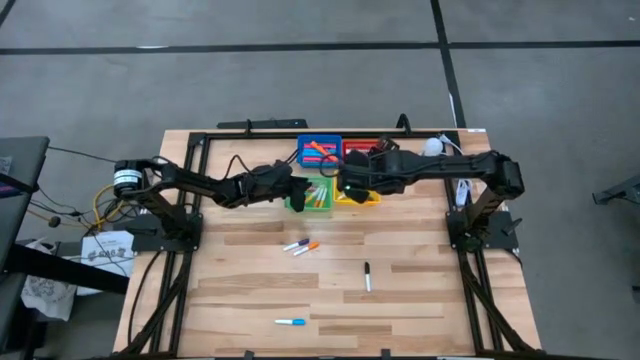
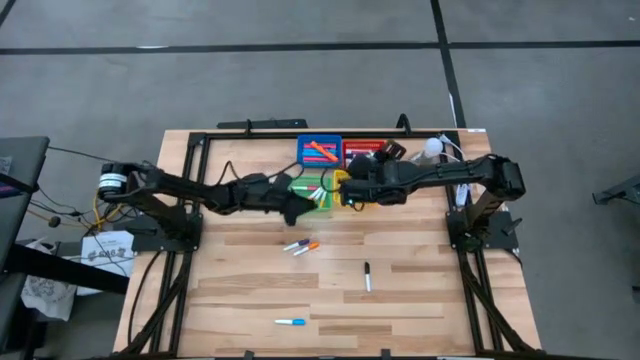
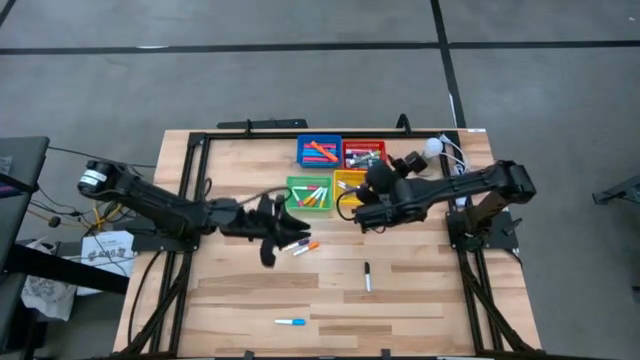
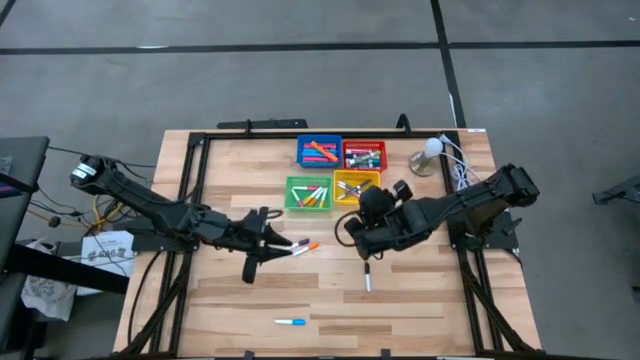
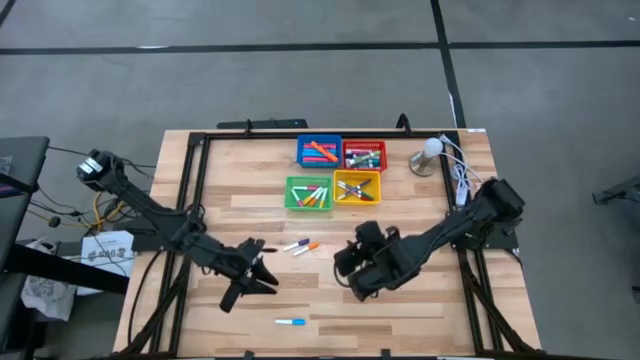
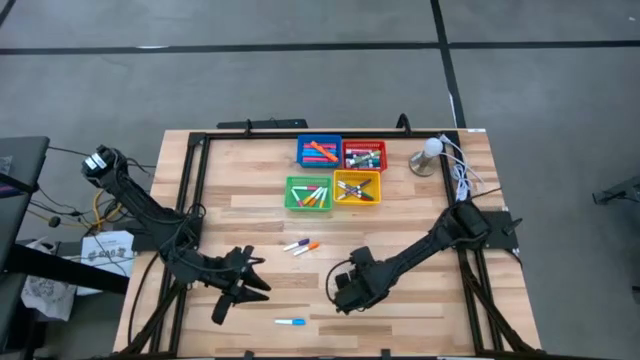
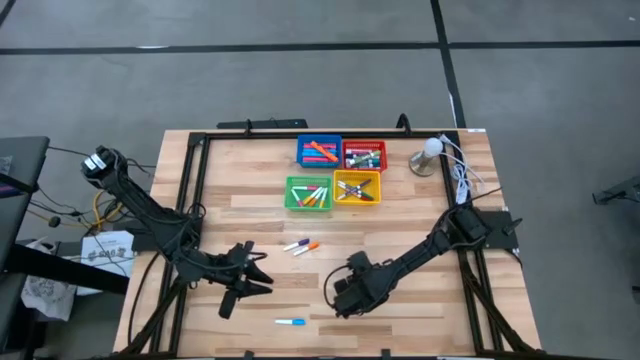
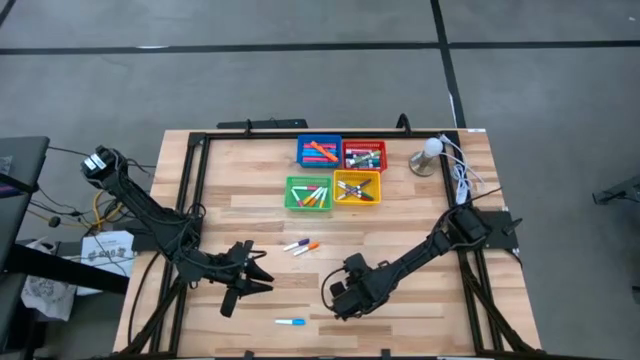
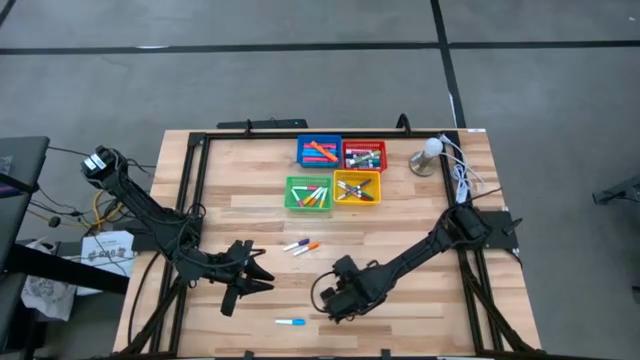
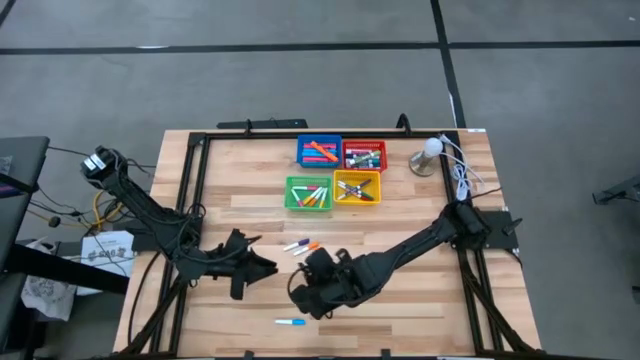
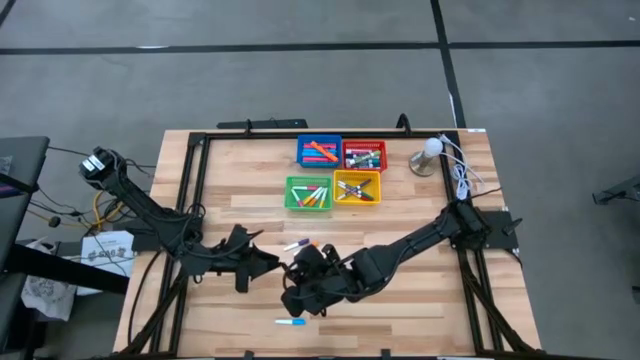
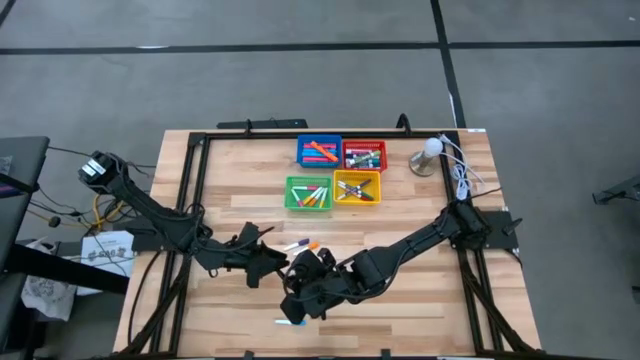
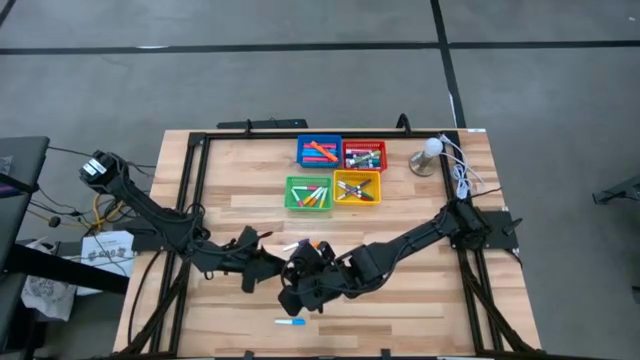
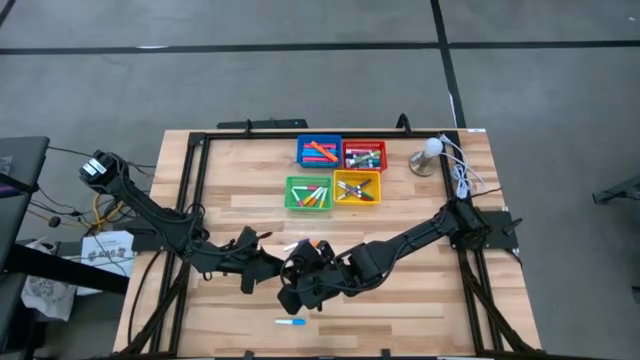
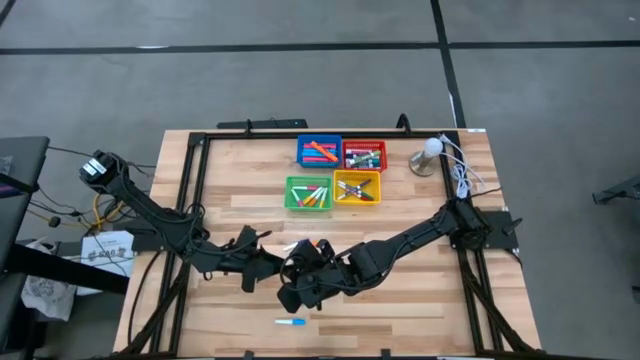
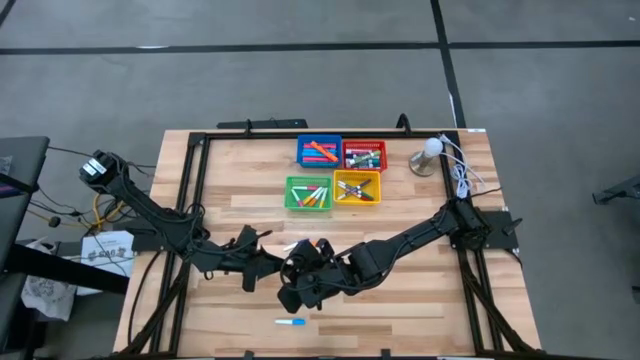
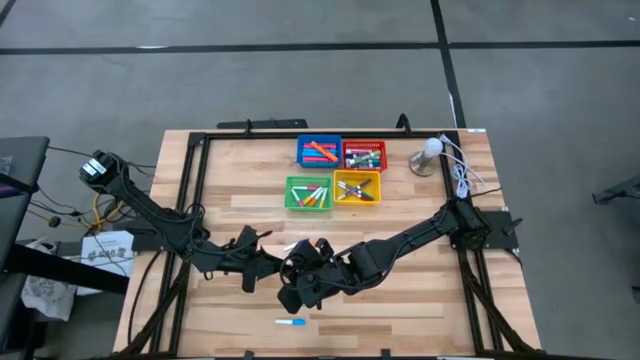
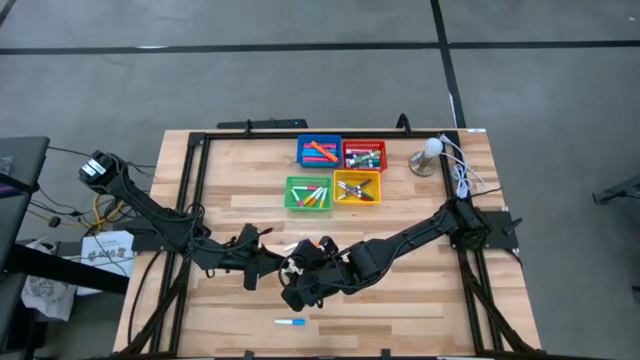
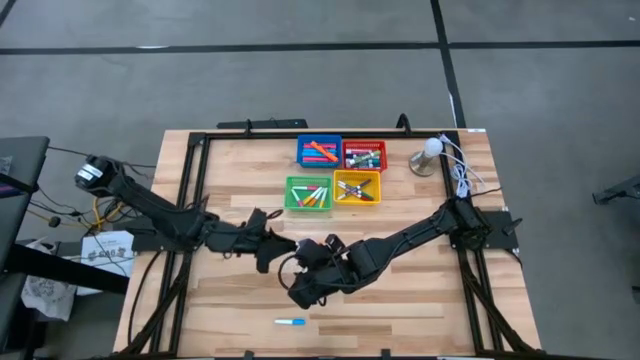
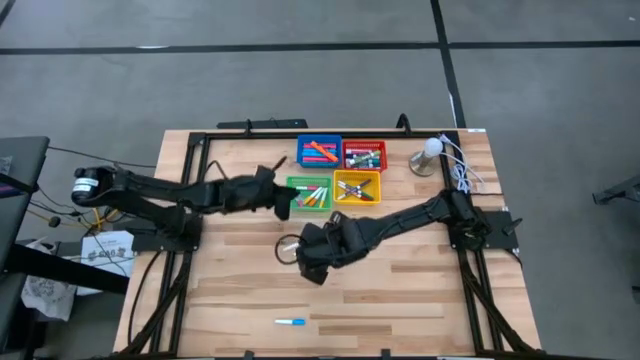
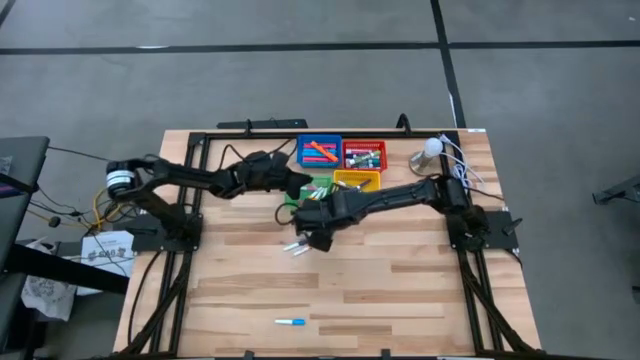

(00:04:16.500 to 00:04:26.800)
Task: Pick & Place Markers
Put the black mini marker into the green bin

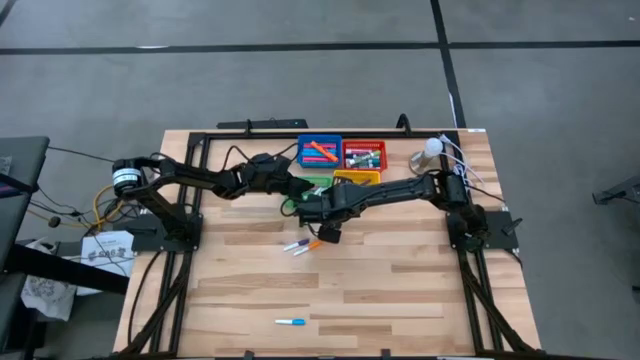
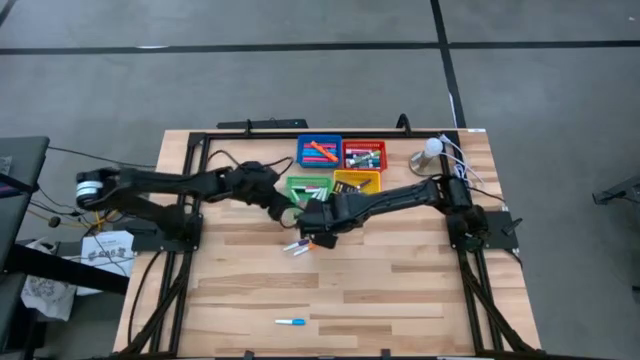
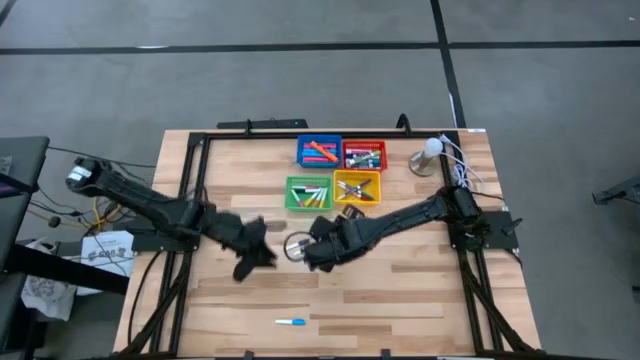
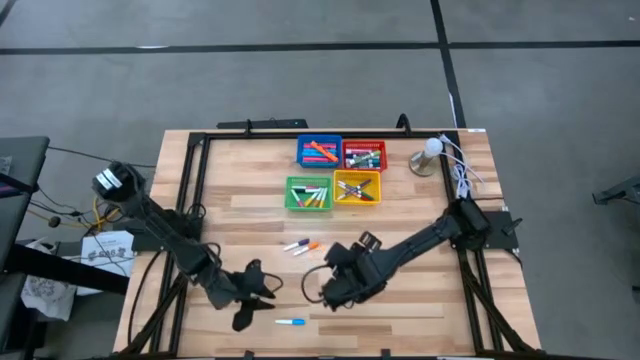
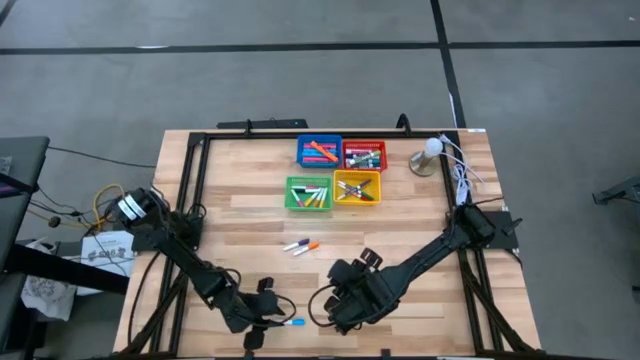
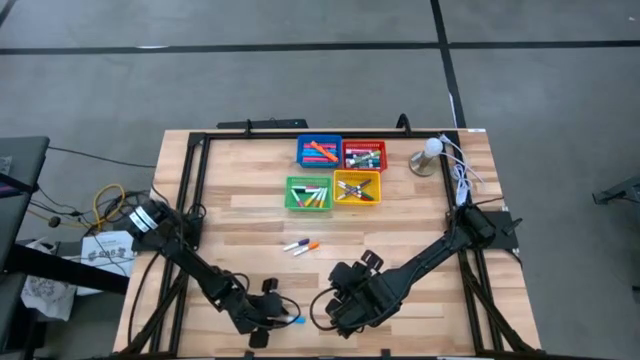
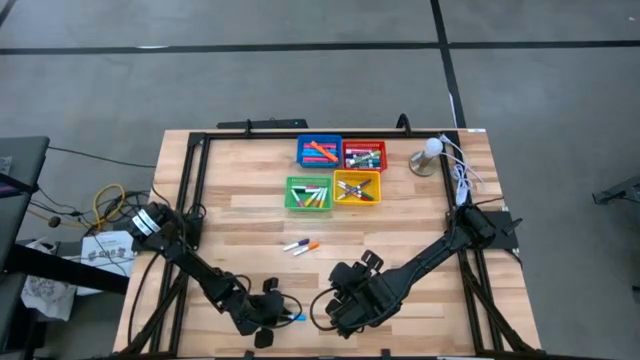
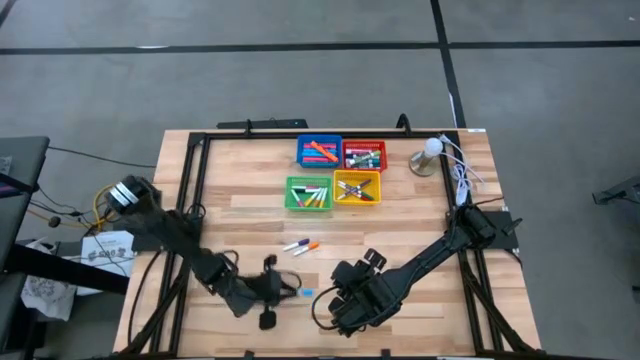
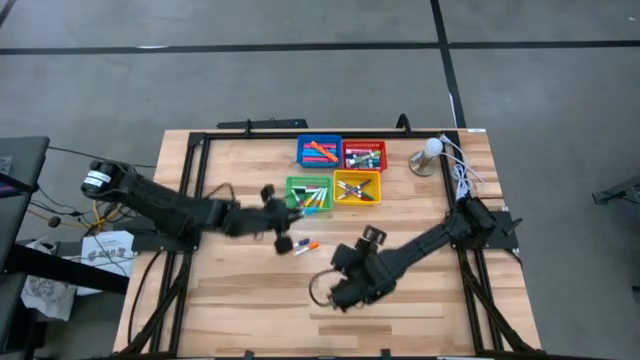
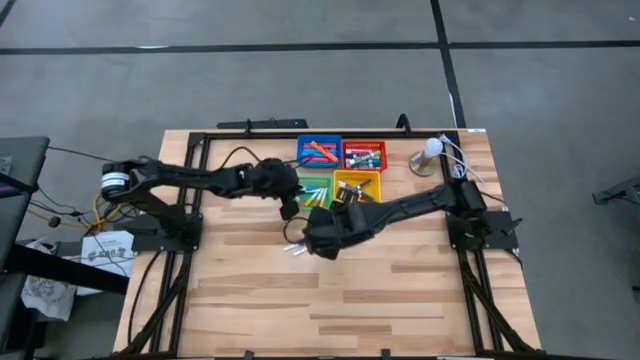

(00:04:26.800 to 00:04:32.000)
Put the blue mini marker into the green bin

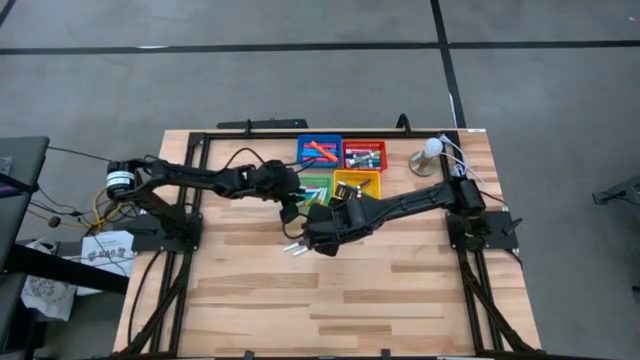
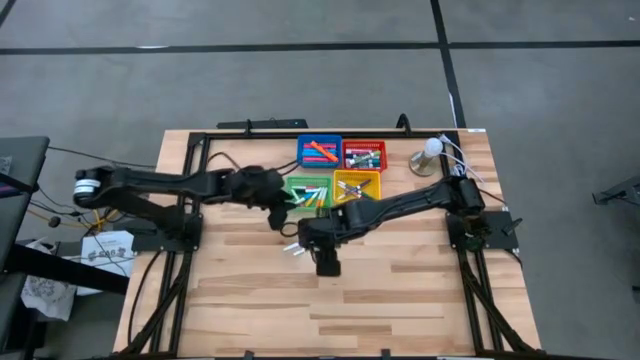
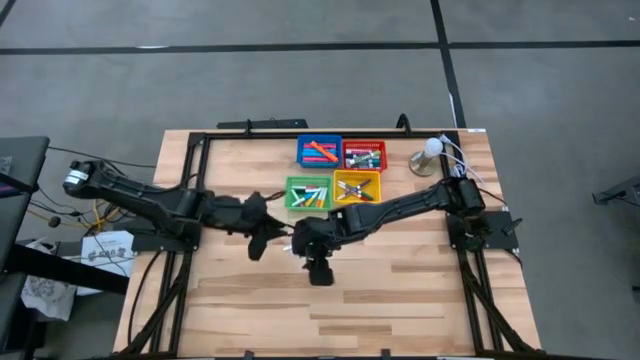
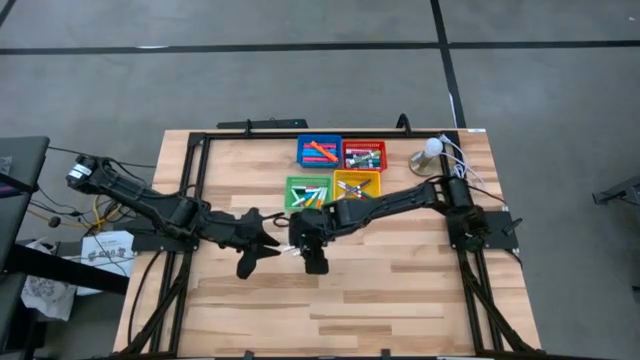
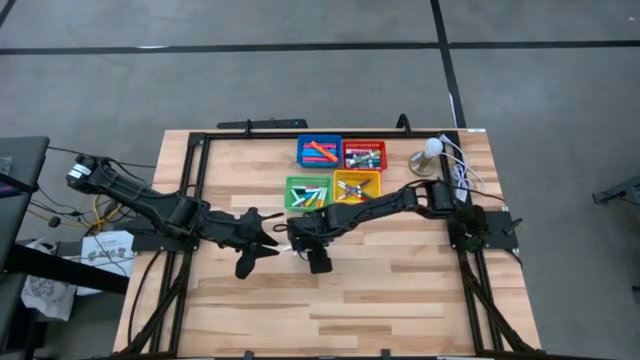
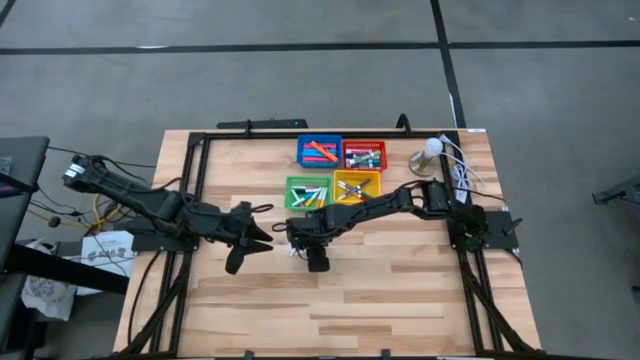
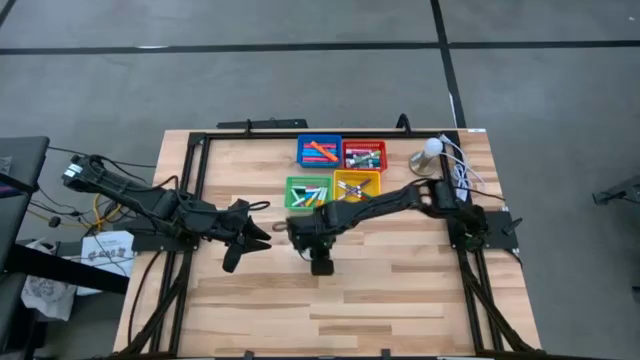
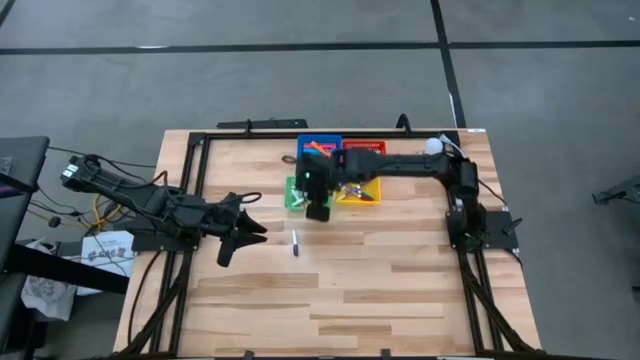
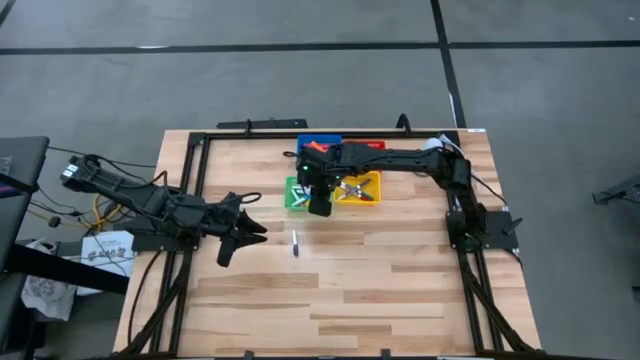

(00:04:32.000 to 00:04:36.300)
Put the orange mini marker into the green bin
